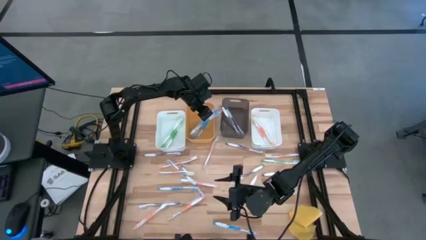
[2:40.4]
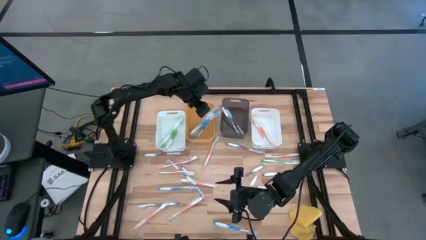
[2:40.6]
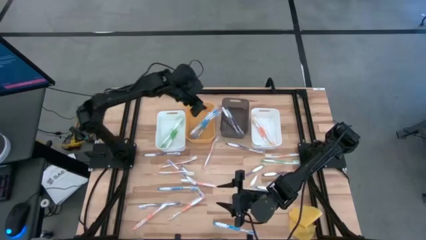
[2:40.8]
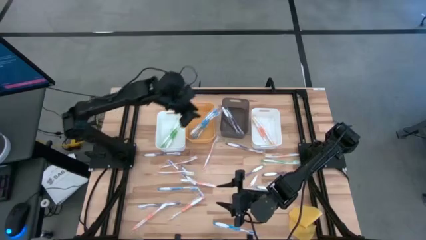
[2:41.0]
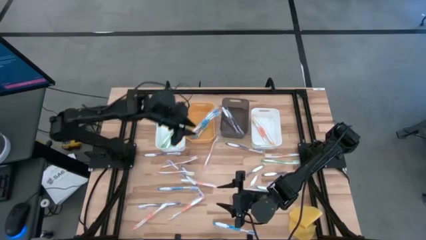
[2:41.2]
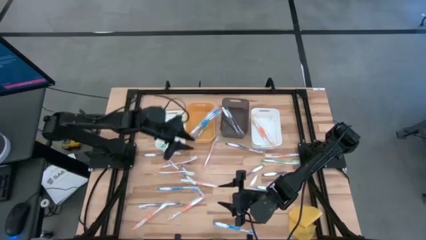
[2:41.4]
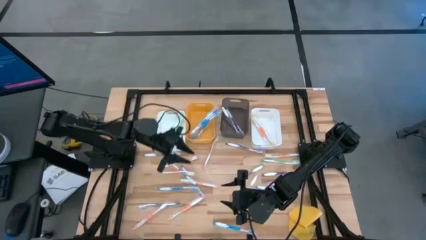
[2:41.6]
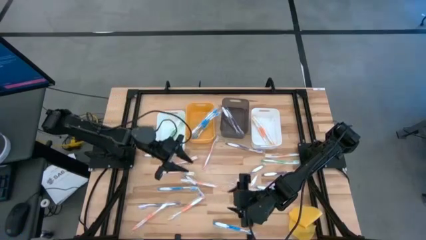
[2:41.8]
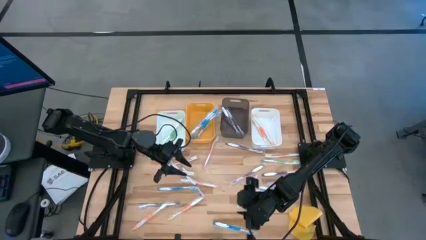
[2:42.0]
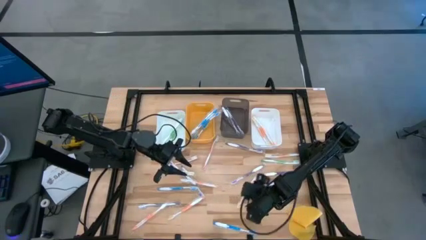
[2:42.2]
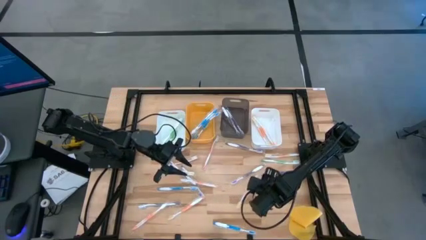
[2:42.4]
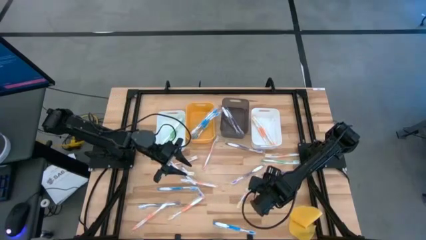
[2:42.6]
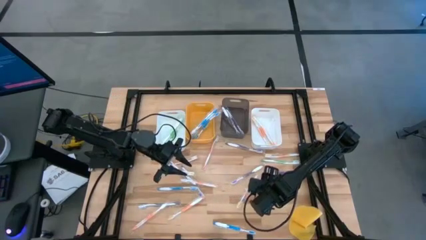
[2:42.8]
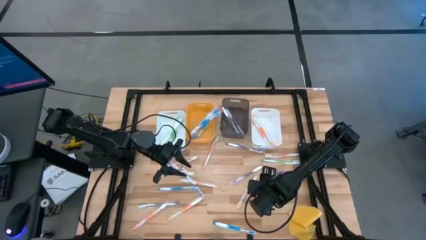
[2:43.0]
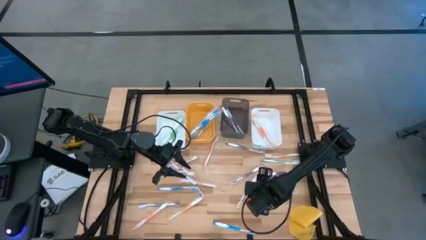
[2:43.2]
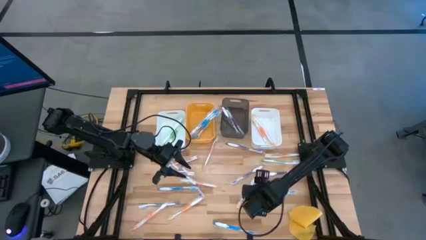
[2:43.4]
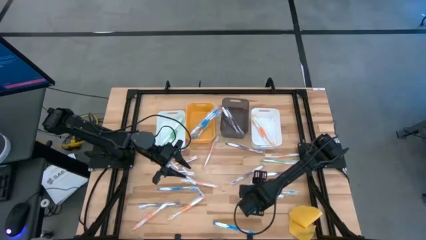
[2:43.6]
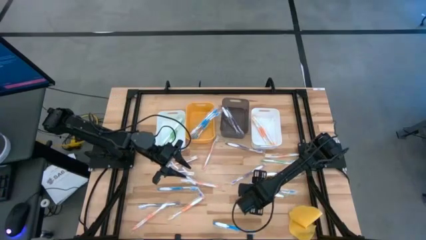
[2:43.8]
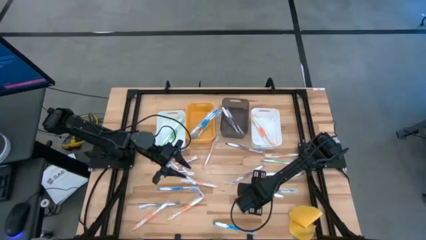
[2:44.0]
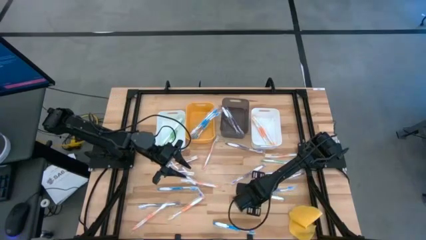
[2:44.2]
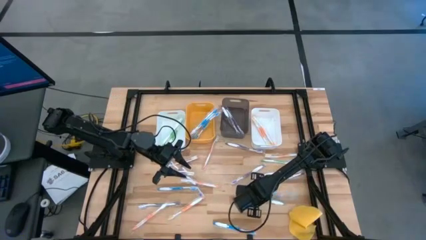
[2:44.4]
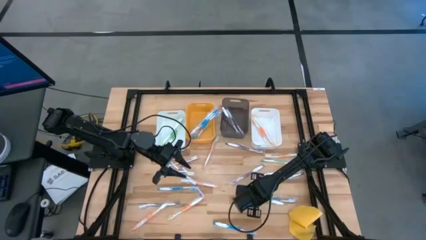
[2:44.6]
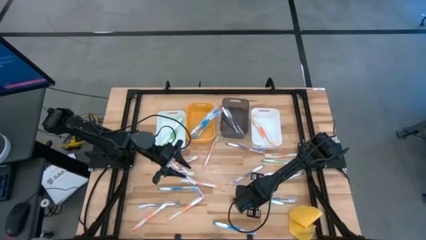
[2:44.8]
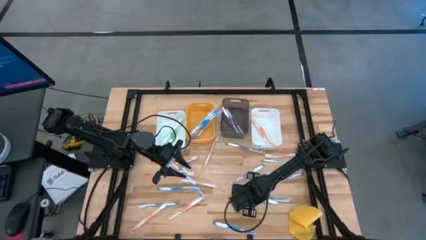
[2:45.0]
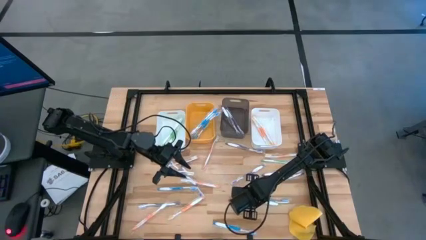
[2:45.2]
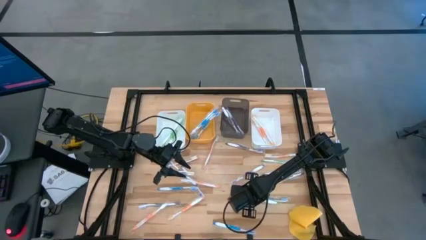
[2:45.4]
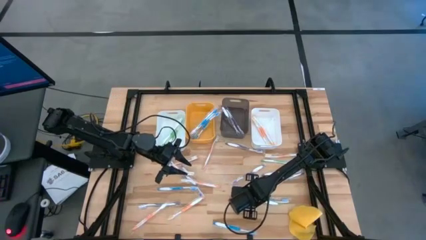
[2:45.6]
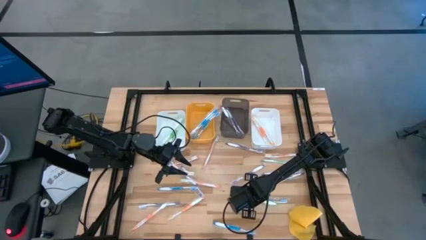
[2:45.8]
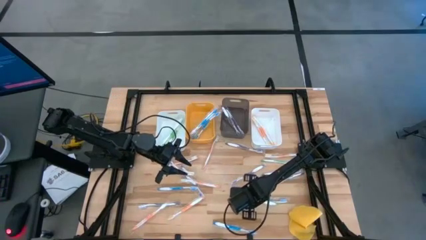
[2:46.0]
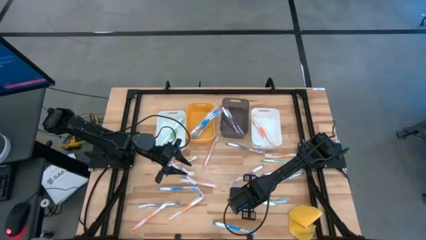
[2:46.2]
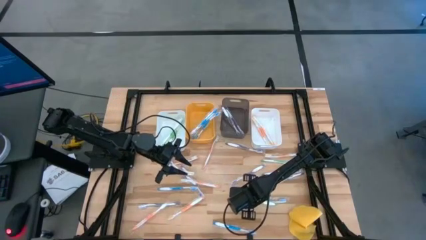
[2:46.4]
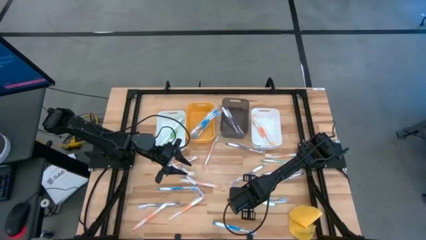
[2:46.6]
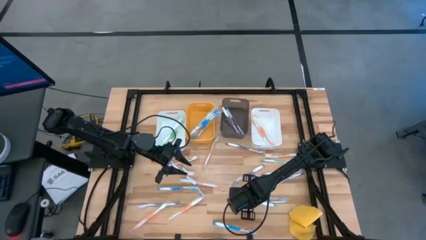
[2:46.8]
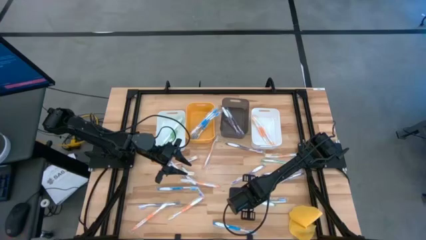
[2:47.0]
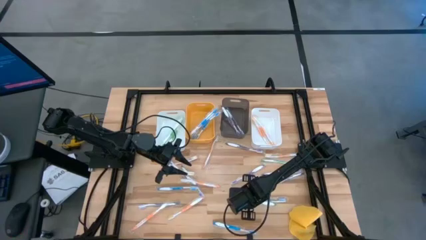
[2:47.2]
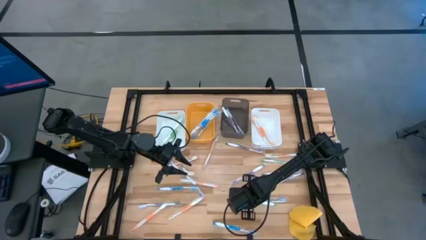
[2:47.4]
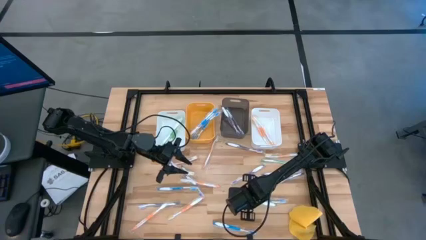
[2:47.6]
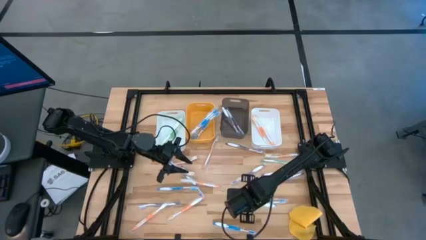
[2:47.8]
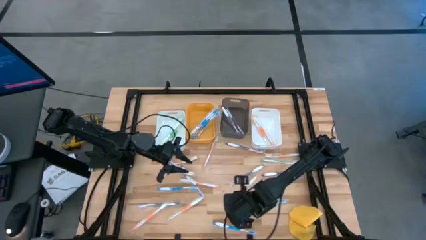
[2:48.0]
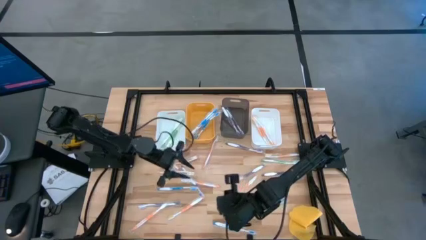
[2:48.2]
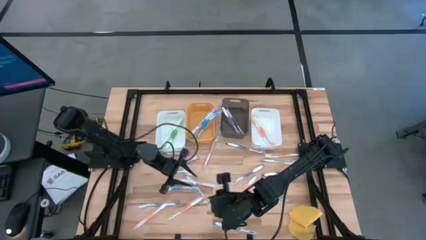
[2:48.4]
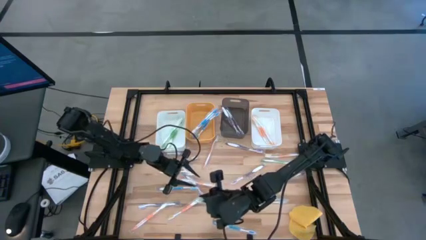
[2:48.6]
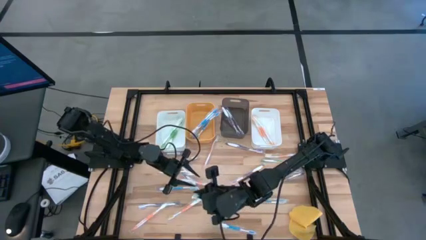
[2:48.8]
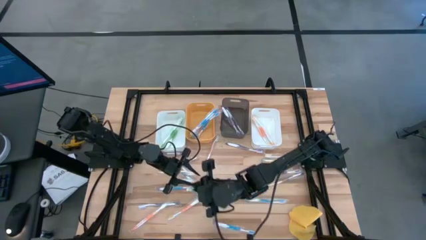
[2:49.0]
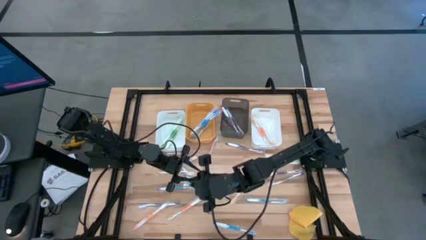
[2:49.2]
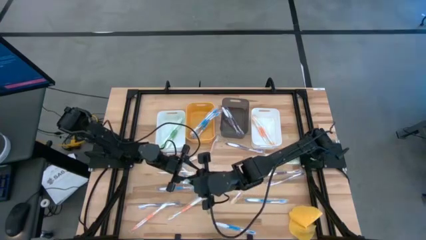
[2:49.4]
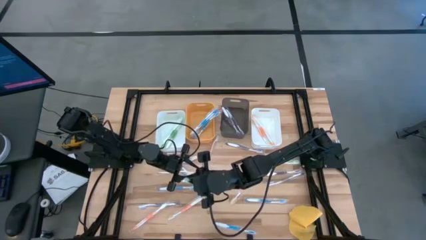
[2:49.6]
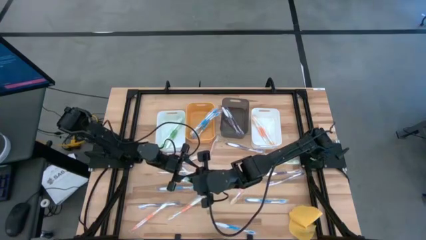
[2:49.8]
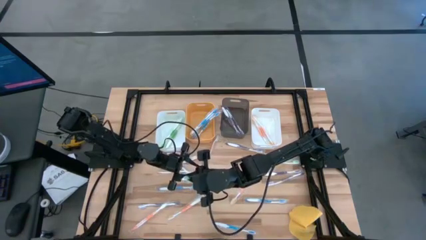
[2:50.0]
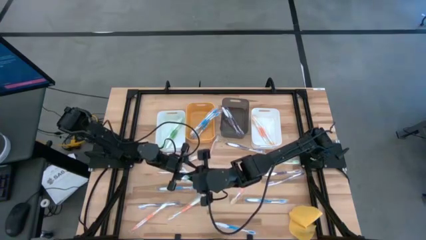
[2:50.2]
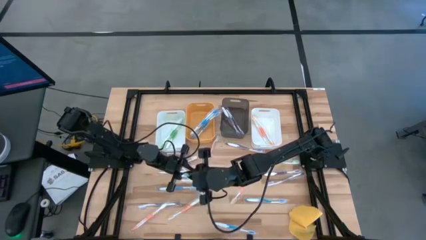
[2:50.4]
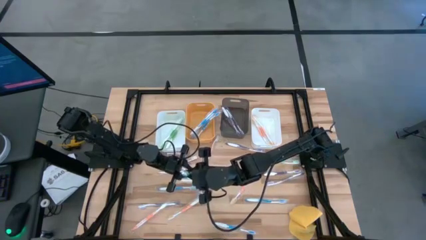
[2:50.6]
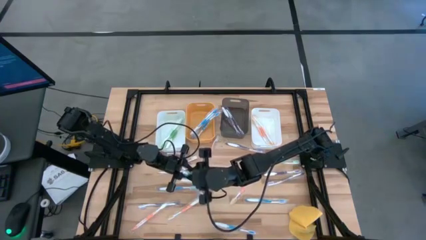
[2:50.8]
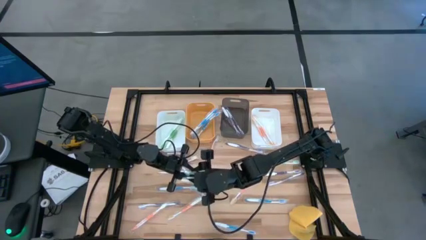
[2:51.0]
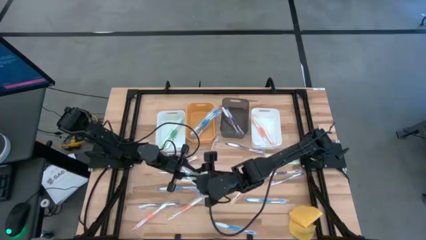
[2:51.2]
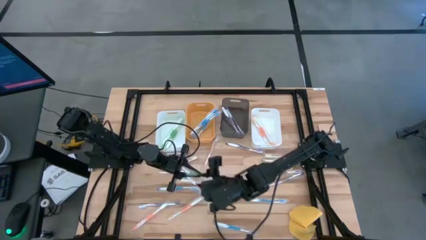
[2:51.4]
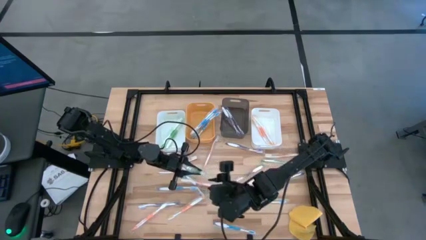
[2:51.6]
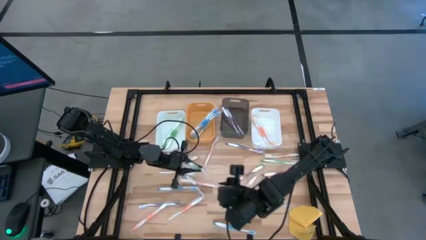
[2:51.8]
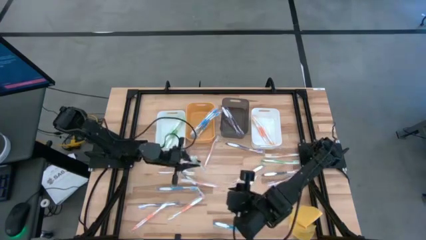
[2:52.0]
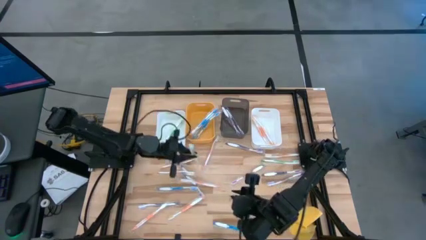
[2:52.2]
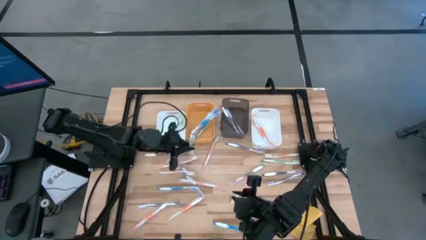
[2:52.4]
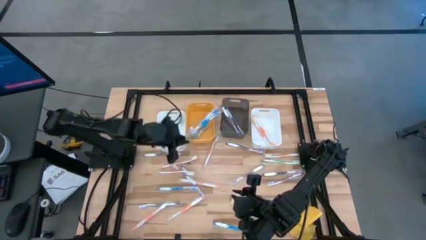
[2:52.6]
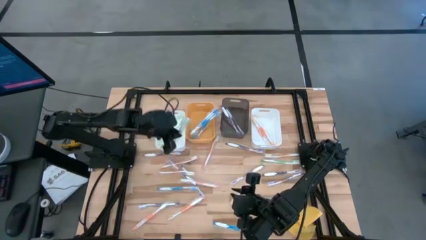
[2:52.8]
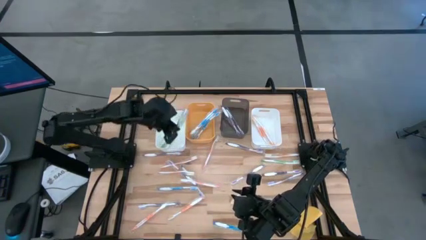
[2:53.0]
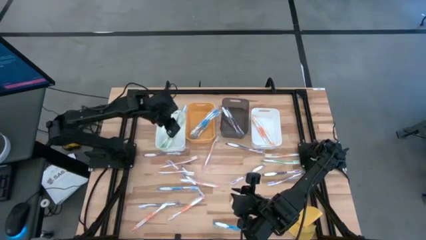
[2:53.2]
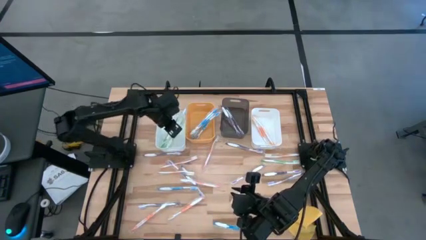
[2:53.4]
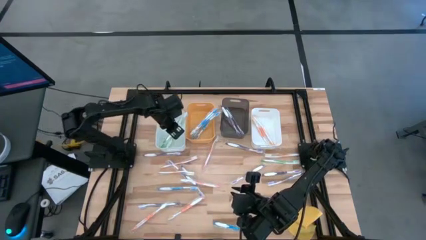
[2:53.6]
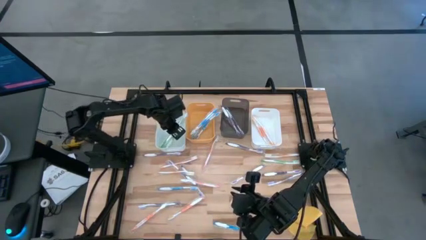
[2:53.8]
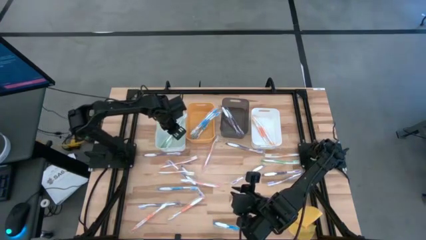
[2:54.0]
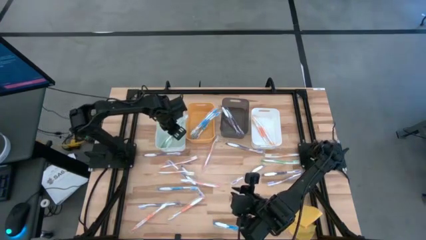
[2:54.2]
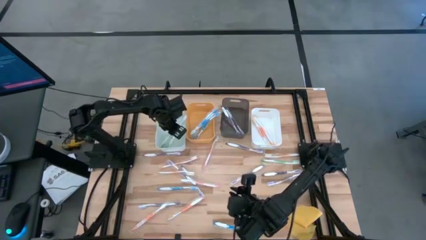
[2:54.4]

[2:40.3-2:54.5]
Task: Pick & Place Toothbrushes
Put the bottom green toothbrush into the left white bin

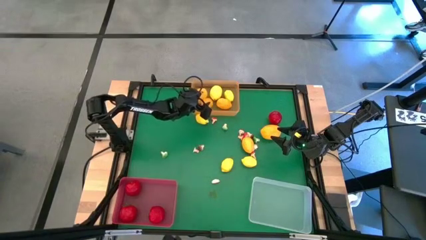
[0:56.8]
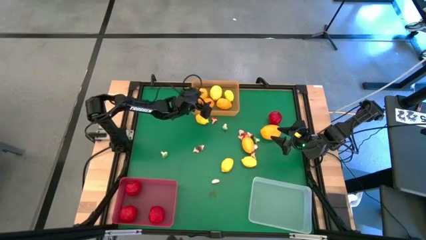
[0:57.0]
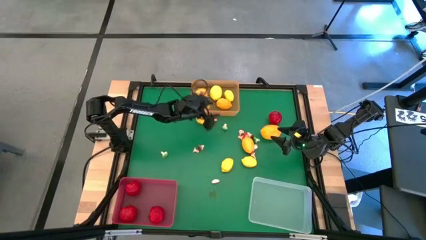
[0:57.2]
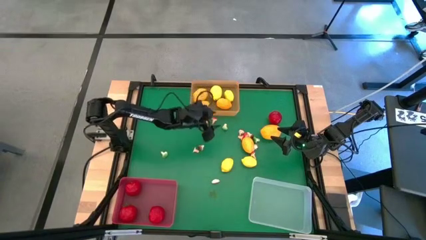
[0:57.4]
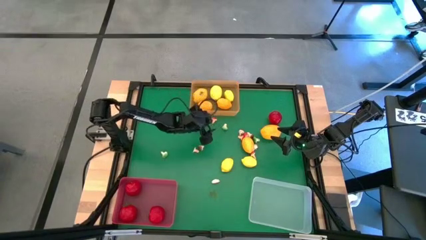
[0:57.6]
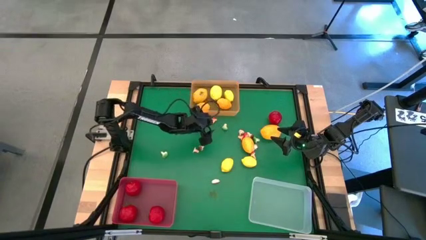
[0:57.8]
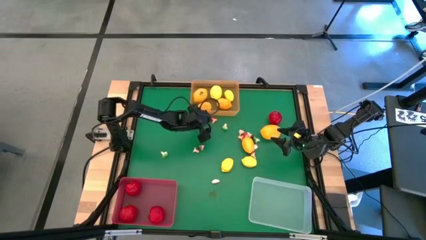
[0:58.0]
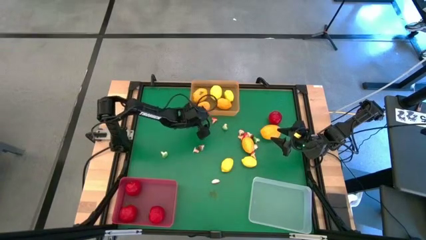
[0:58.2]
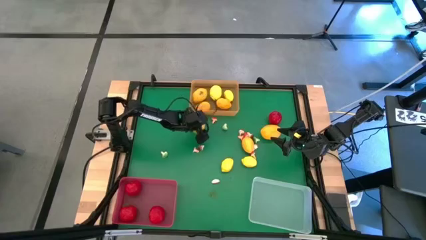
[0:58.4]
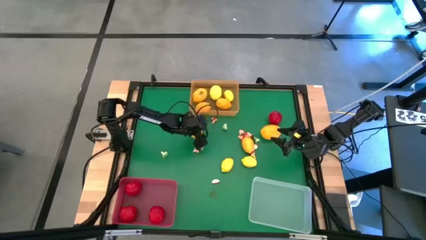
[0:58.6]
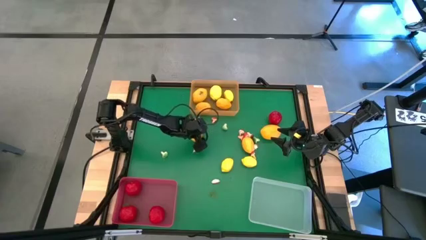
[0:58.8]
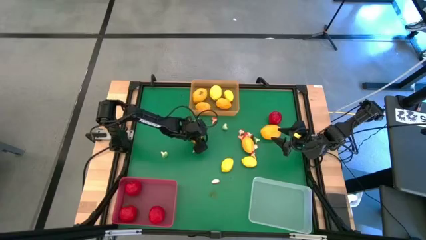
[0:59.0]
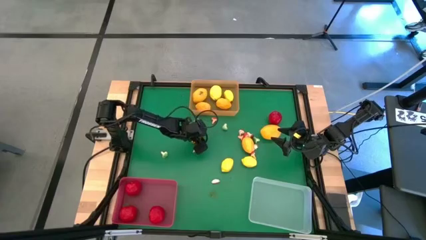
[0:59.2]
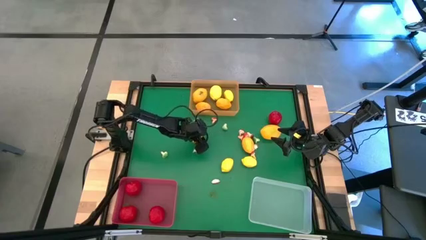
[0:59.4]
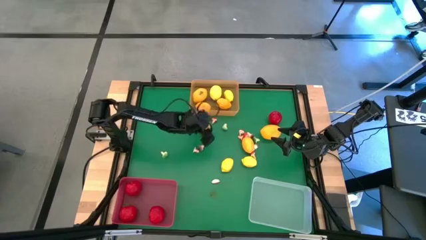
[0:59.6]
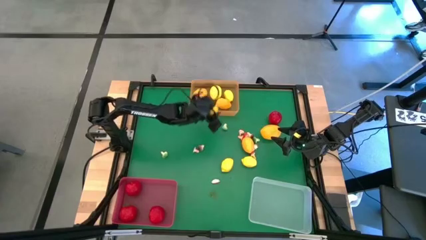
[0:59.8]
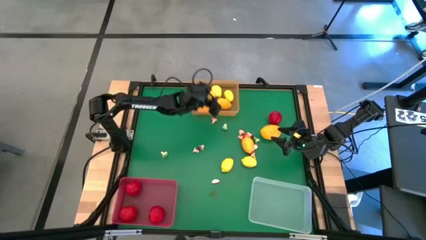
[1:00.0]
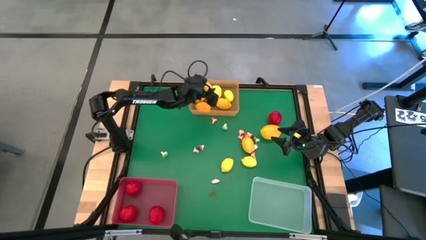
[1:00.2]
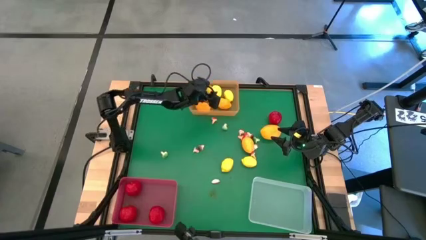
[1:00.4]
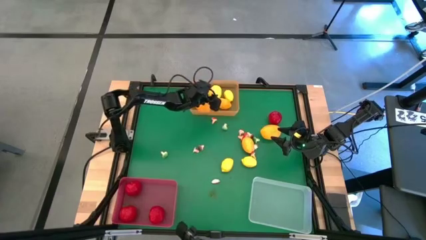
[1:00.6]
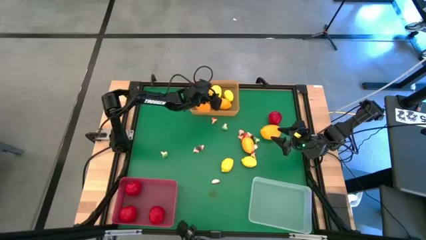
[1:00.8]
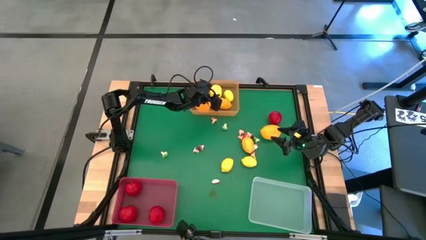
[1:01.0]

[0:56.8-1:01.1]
Task: Sort produce into baskets
Put the yellow lemon into the orange bin
